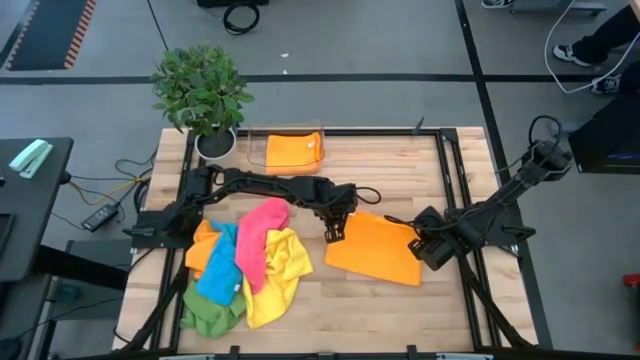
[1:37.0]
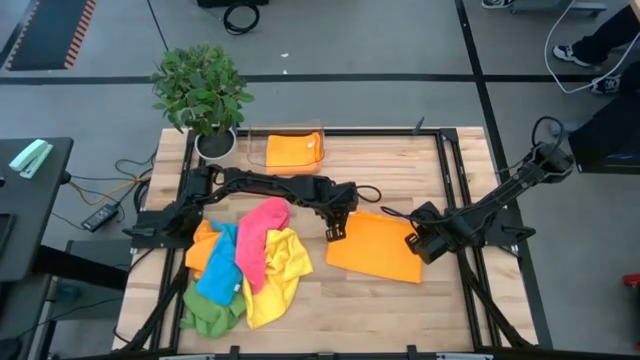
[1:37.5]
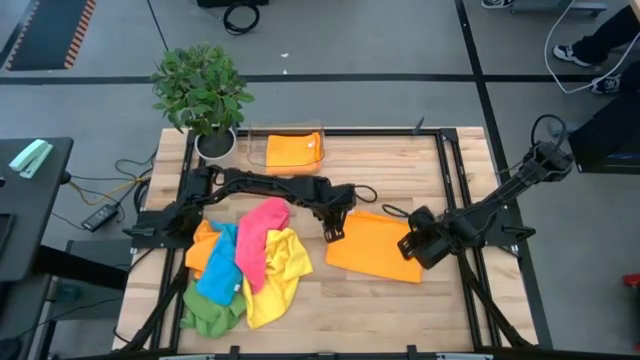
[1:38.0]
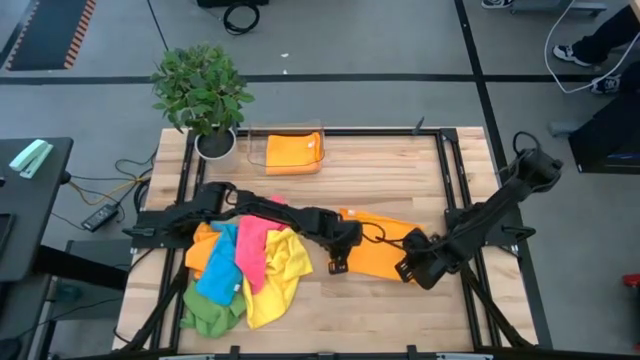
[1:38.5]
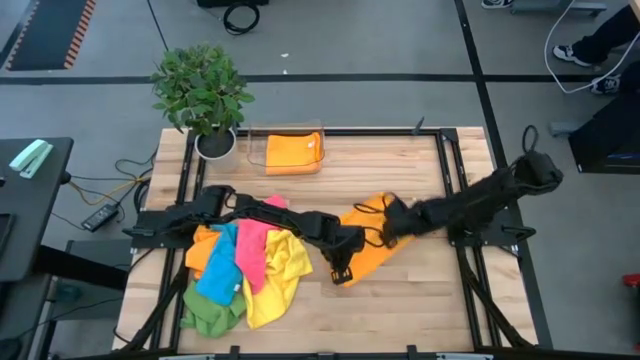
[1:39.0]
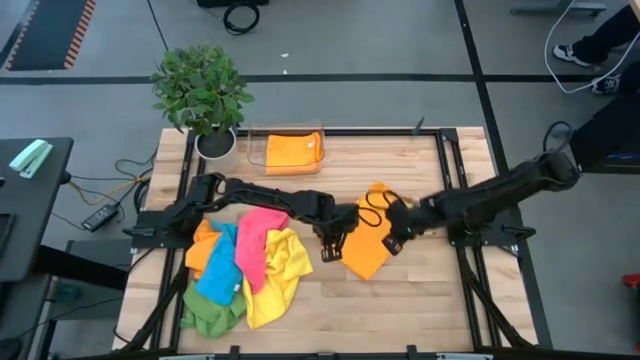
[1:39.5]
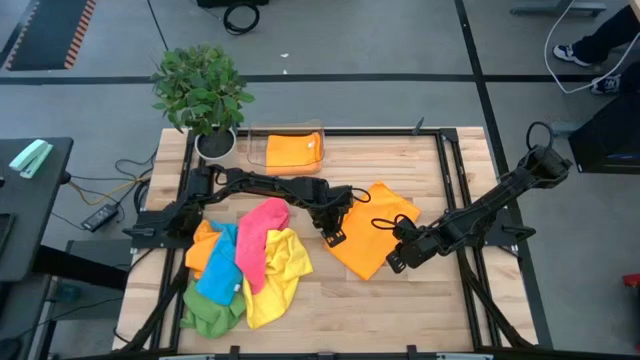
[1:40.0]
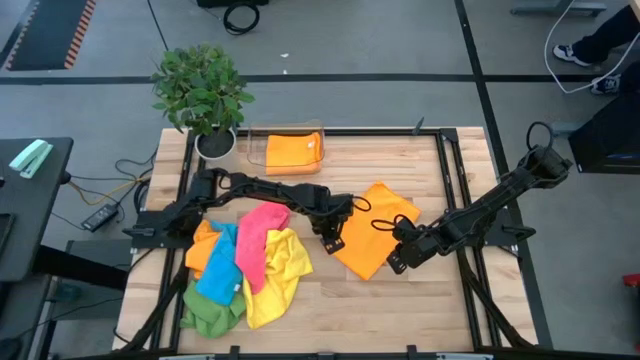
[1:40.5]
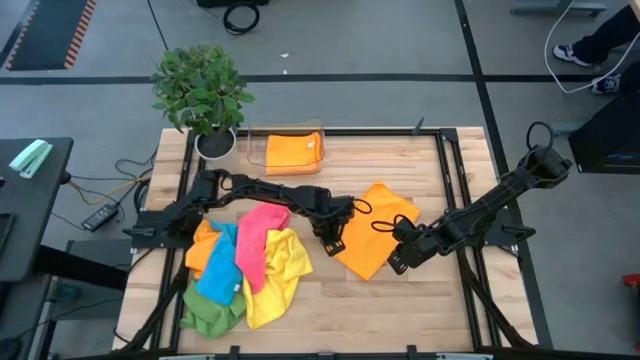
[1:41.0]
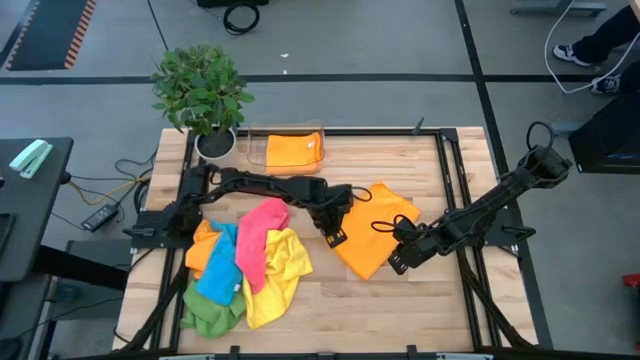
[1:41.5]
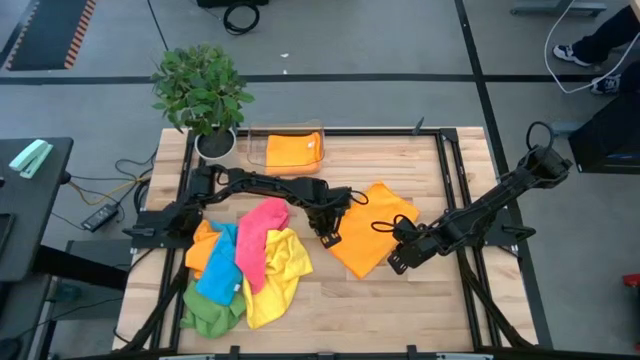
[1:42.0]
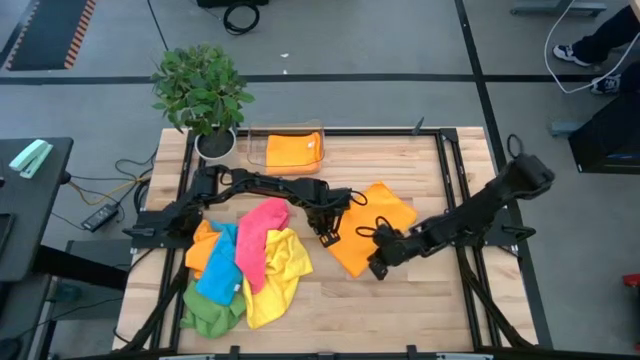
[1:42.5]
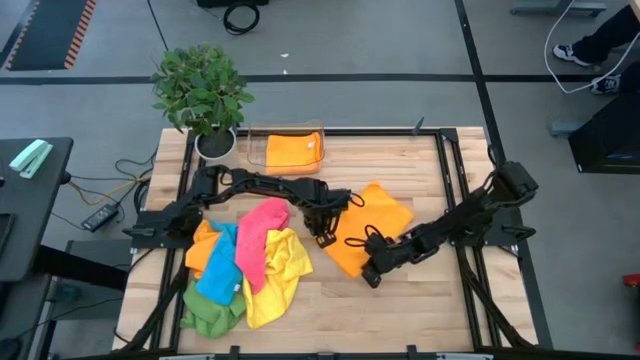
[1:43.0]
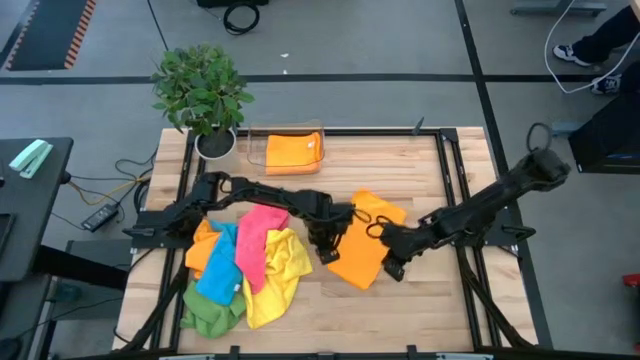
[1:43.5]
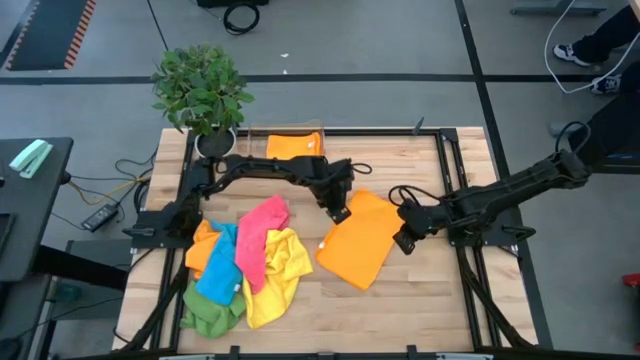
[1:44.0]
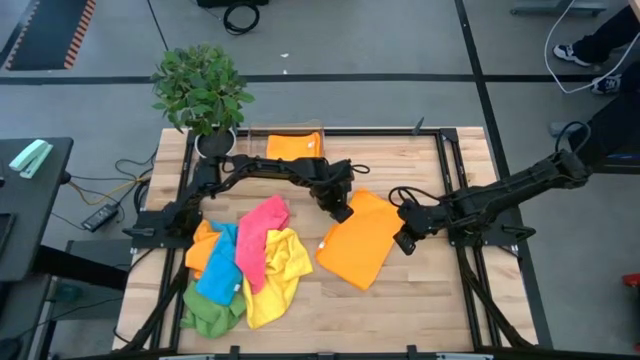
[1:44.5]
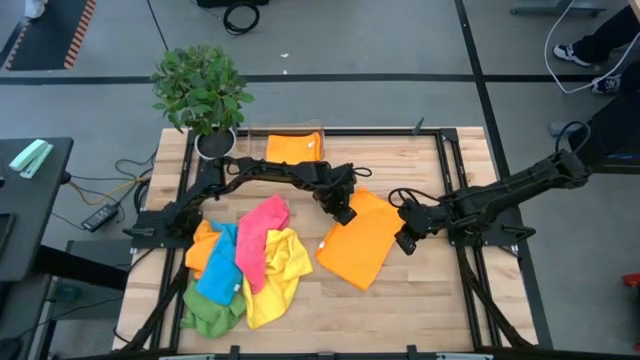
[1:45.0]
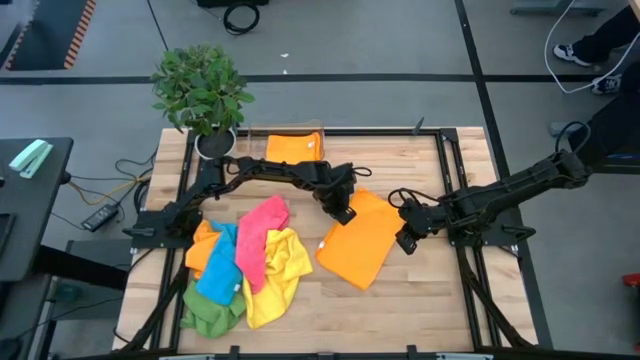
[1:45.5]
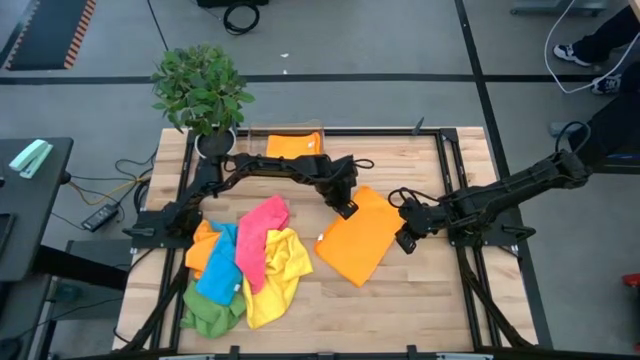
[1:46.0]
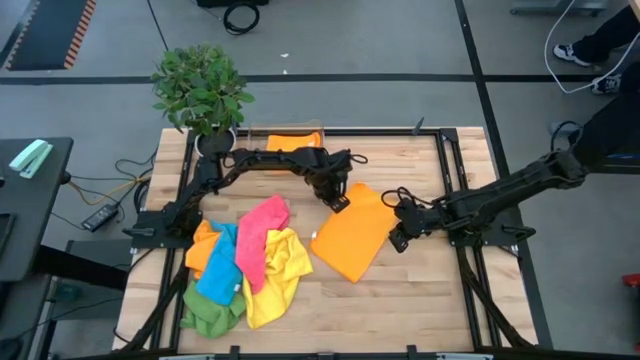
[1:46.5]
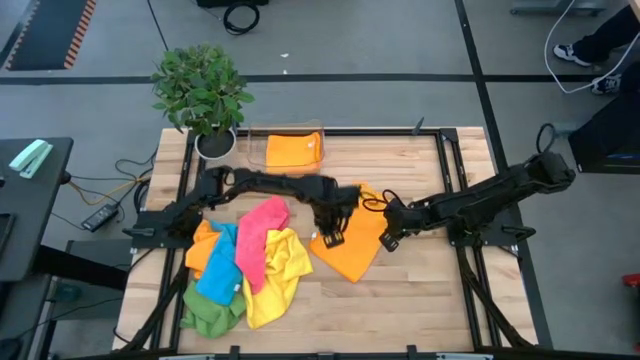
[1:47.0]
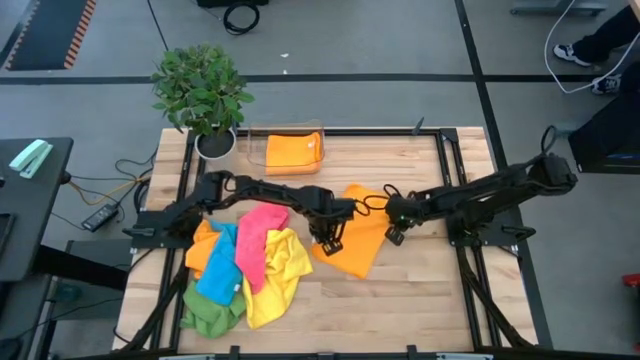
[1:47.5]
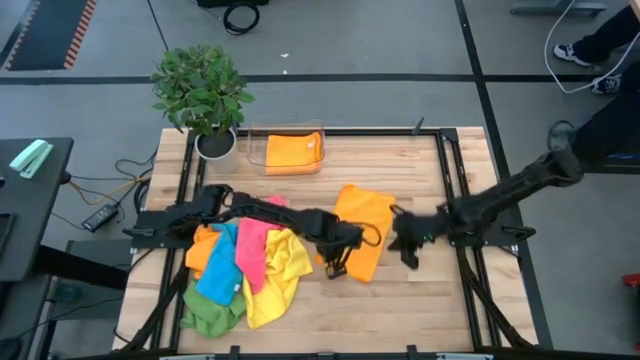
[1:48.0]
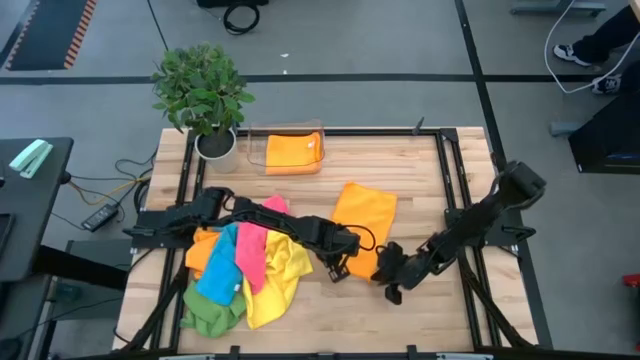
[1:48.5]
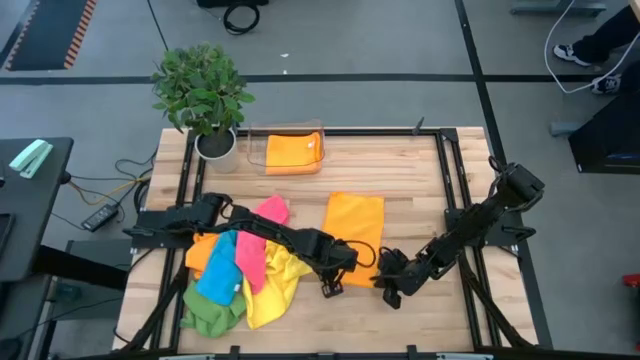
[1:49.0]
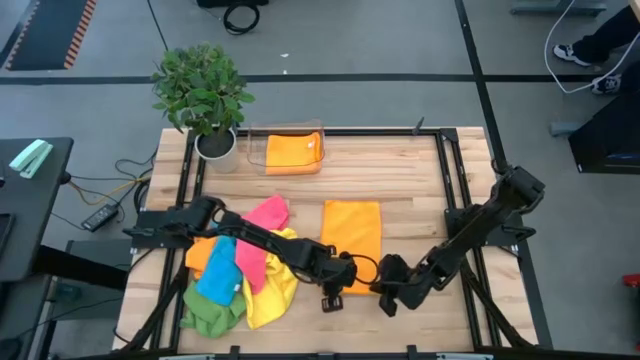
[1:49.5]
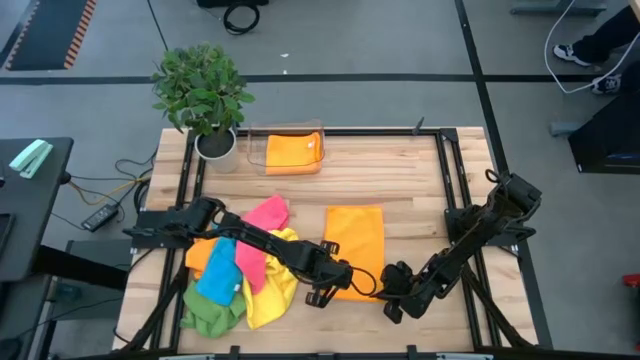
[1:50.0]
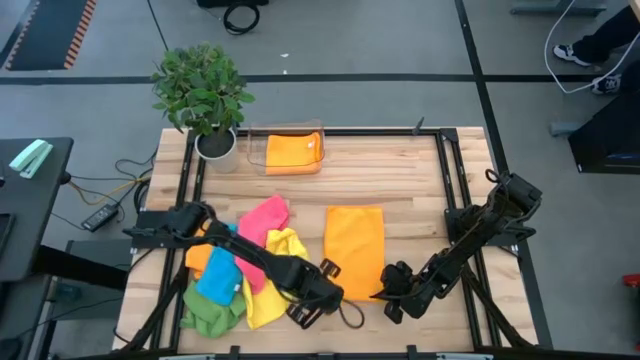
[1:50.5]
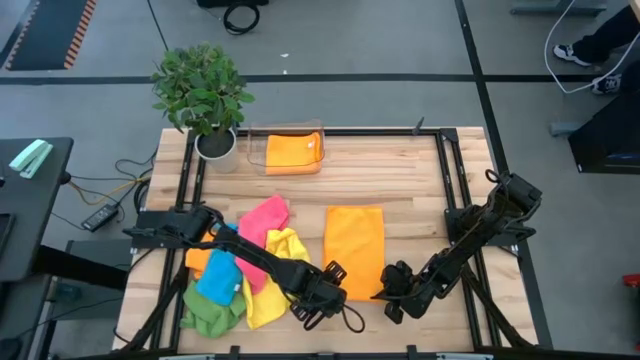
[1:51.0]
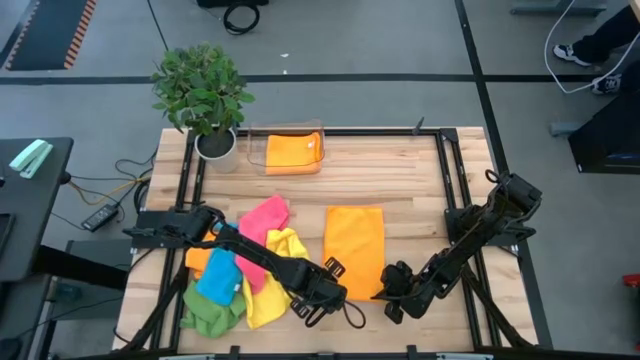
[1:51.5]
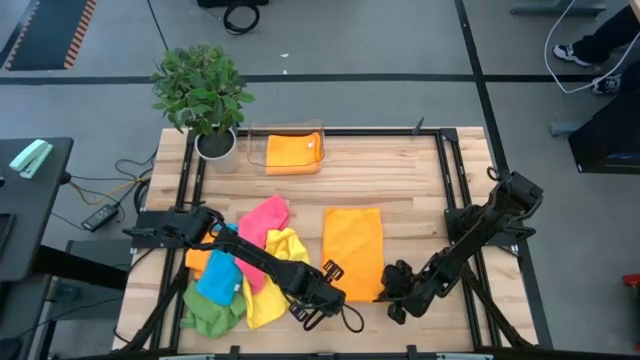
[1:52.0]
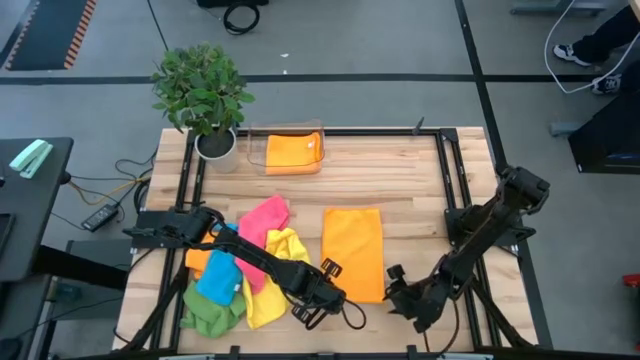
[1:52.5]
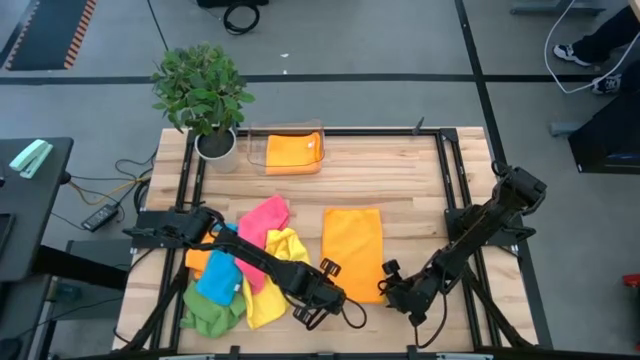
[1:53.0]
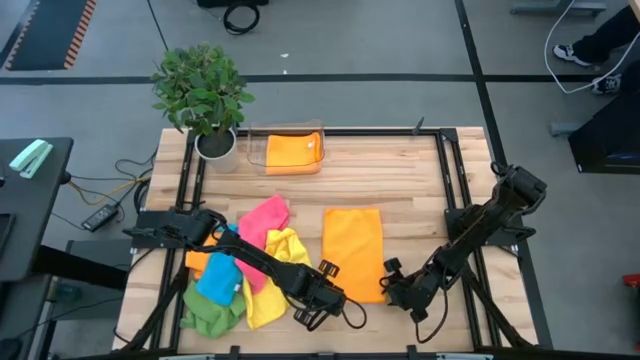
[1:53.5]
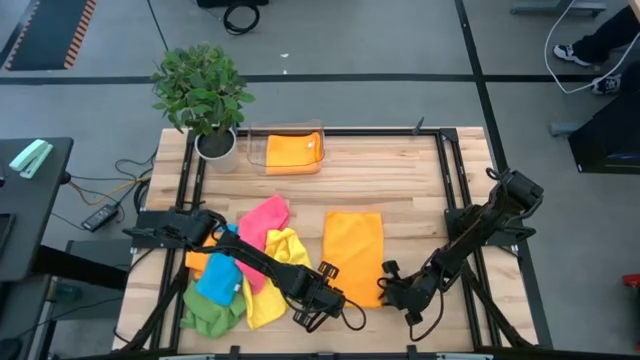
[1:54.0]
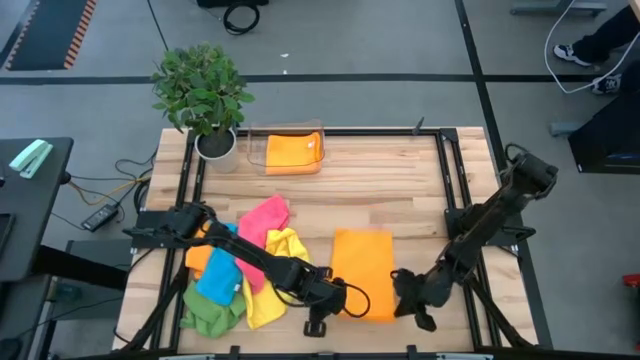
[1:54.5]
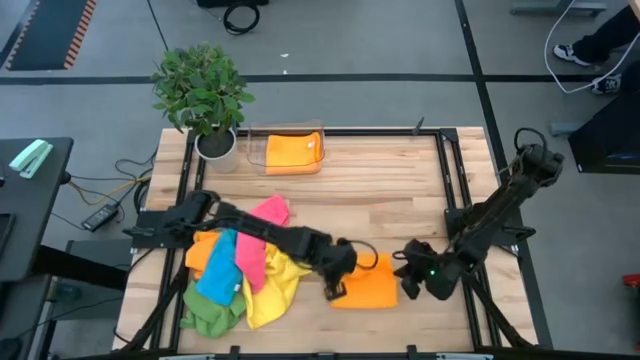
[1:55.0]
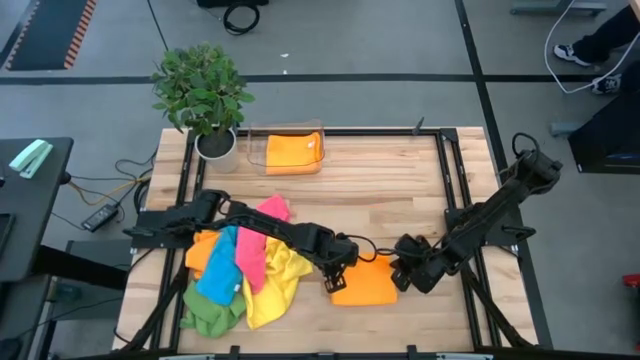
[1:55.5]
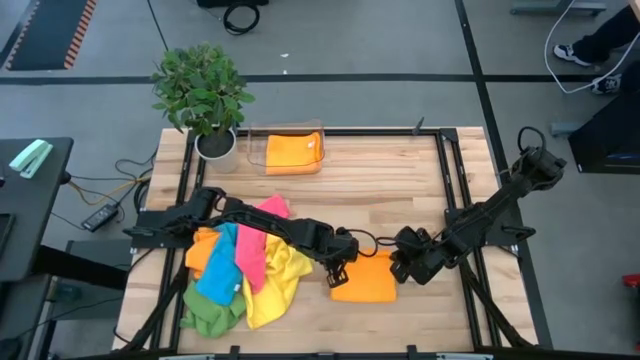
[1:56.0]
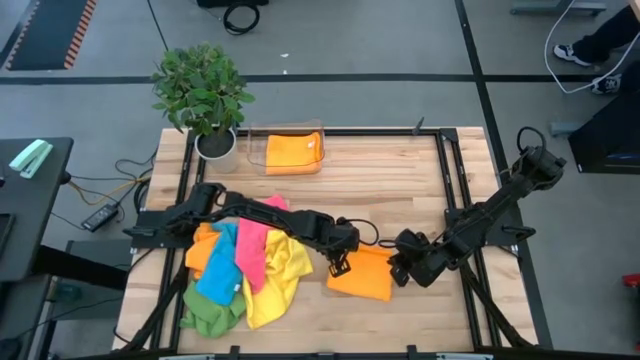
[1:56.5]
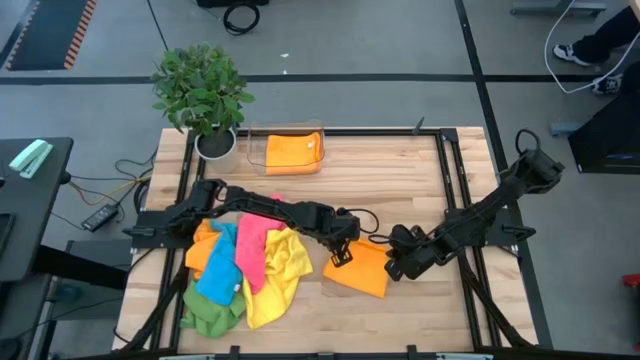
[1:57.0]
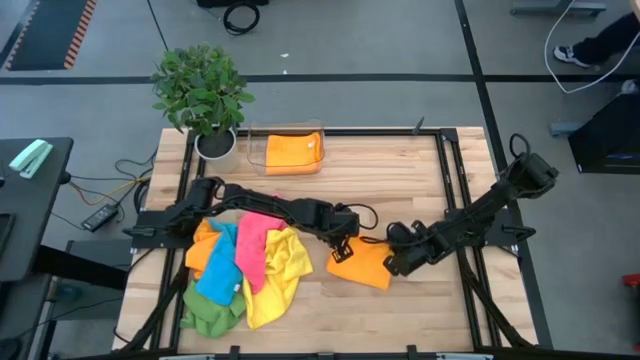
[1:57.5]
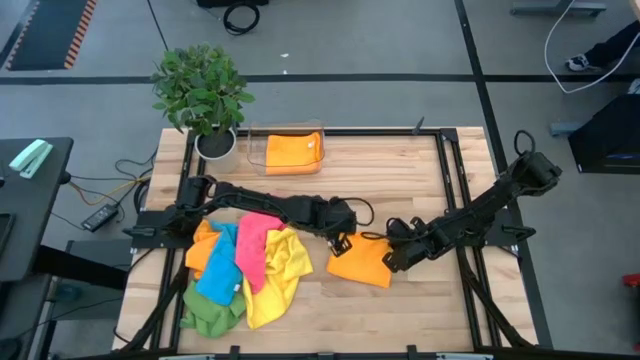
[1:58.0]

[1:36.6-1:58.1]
Task: Fold microfiber towels
Fold the right orange microfiber cloth
